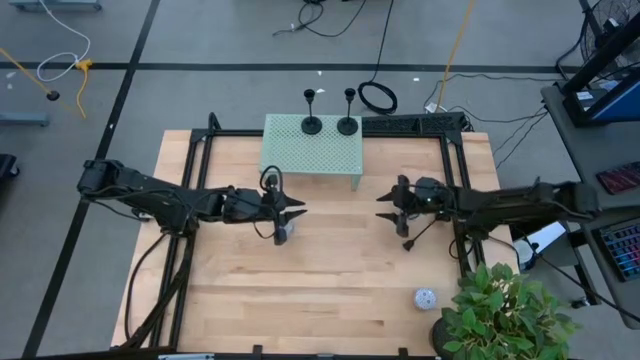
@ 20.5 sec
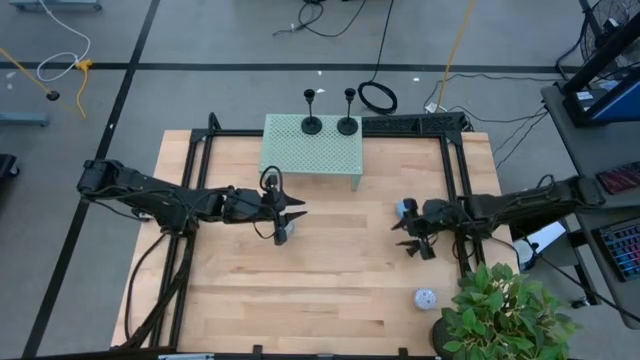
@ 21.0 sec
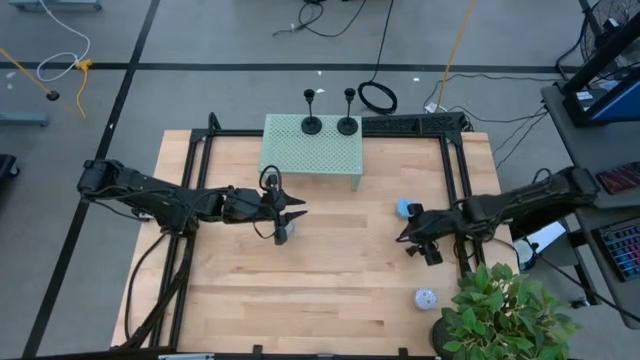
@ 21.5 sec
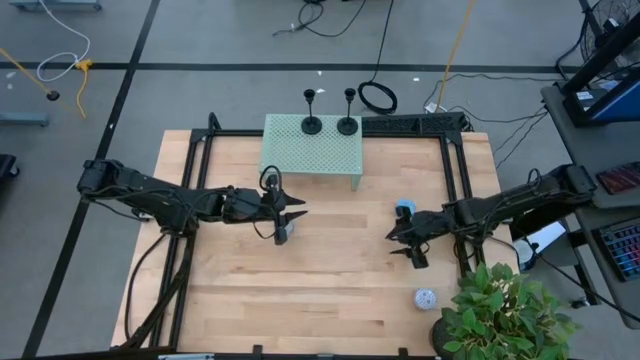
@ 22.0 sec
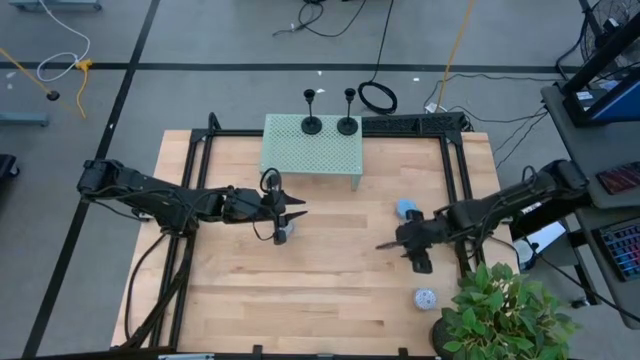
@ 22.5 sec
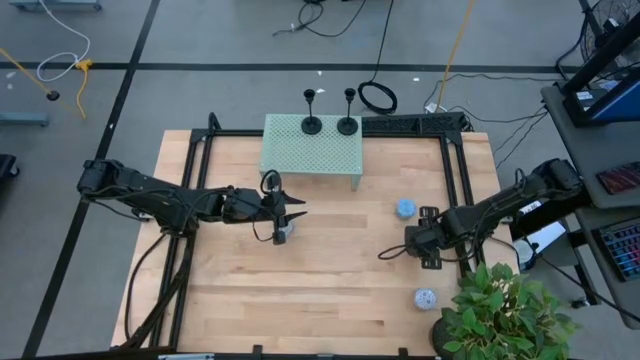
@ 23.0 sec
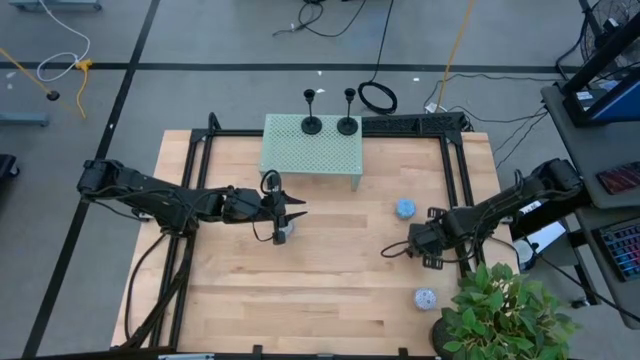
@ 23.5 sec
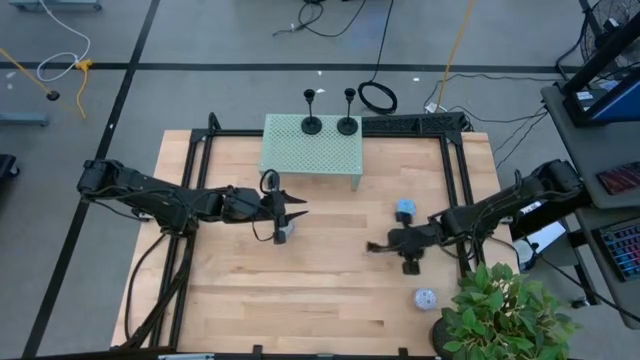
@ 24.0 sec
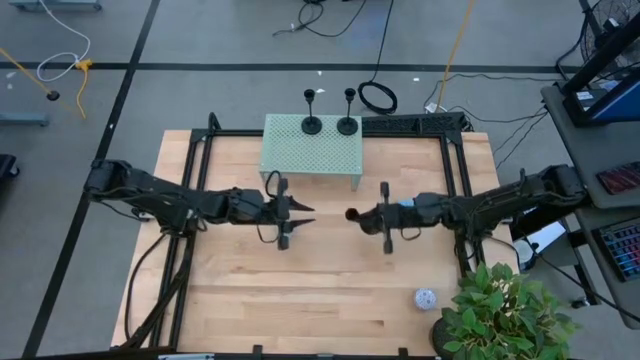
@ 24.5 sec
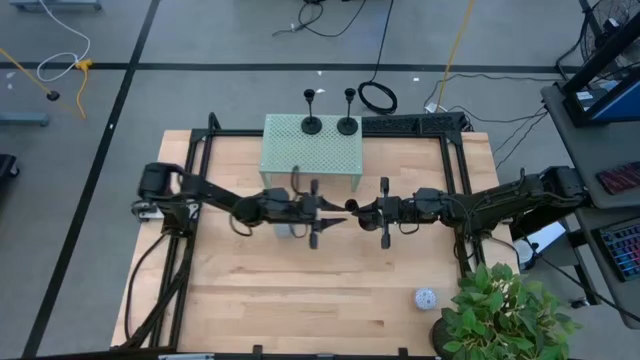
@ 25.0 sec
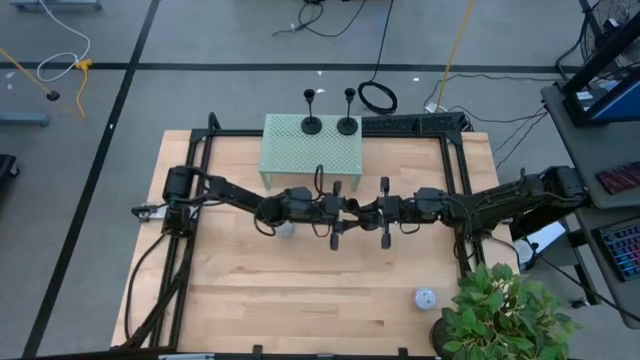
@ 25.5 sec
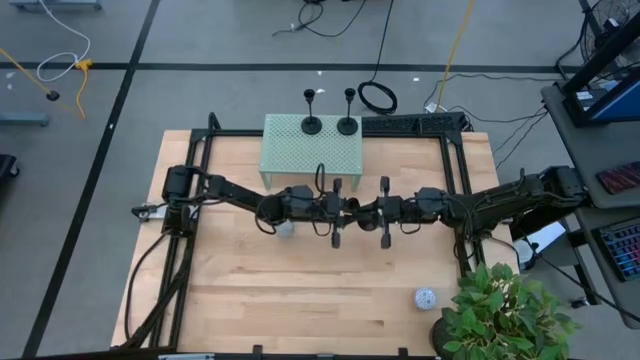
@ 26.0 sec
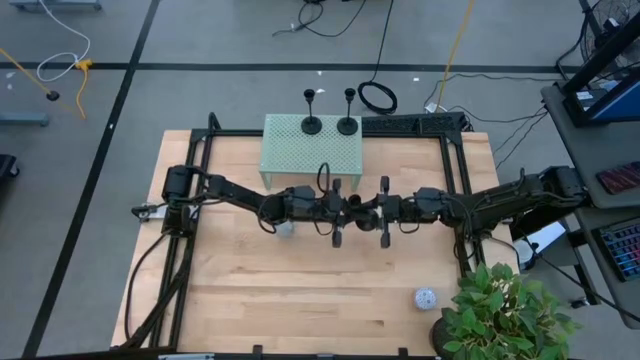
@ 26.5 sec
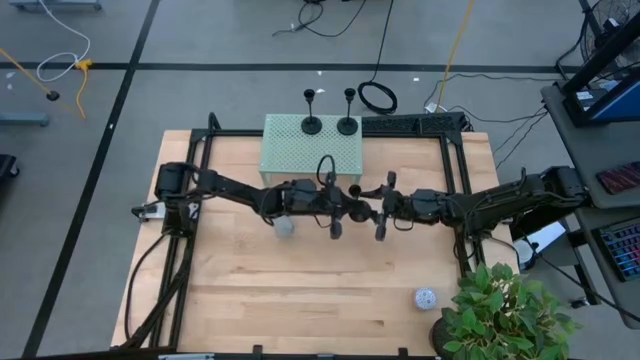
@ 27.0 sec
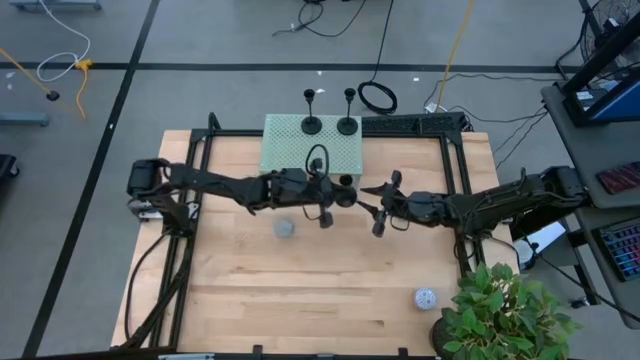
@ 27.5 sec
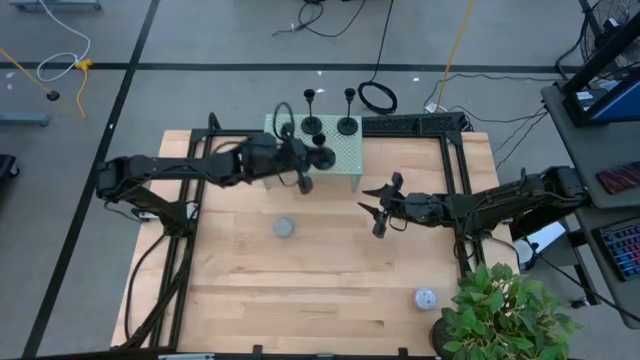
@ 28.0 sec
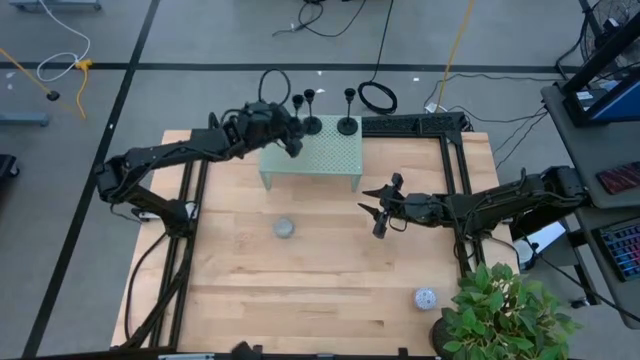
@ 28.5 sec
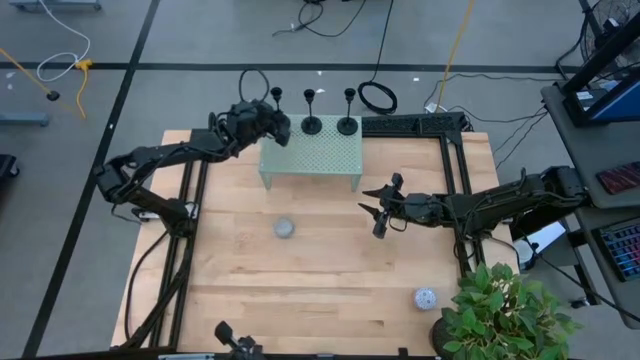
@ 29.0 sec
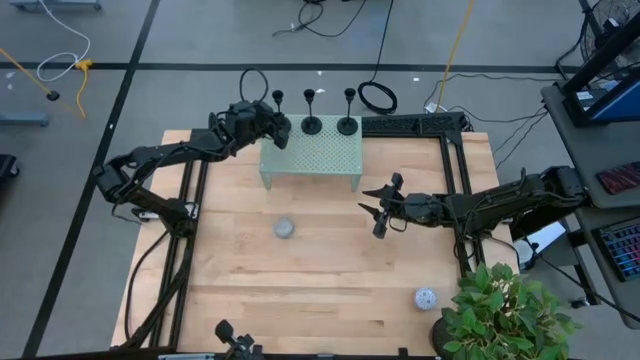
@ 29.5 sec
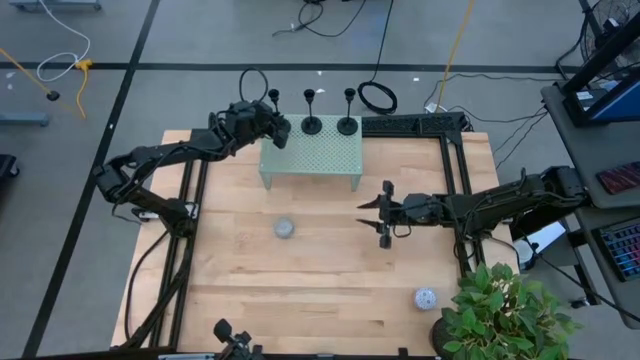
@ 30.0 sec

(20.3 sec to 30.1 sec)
Task: Pick & Place candle stick holders
Put the black candle holder on the shelf

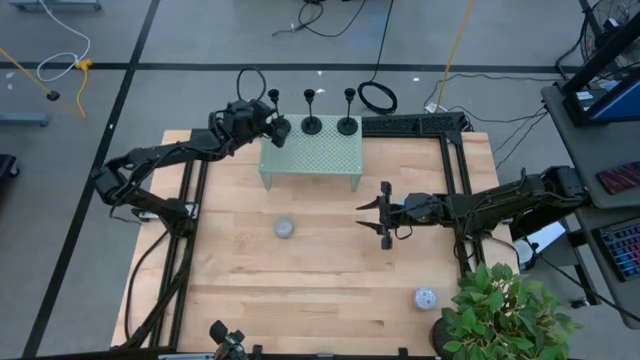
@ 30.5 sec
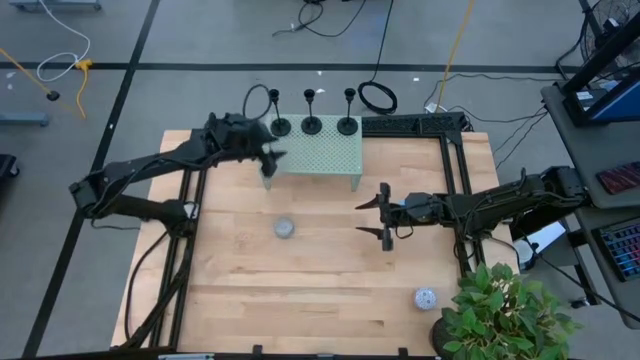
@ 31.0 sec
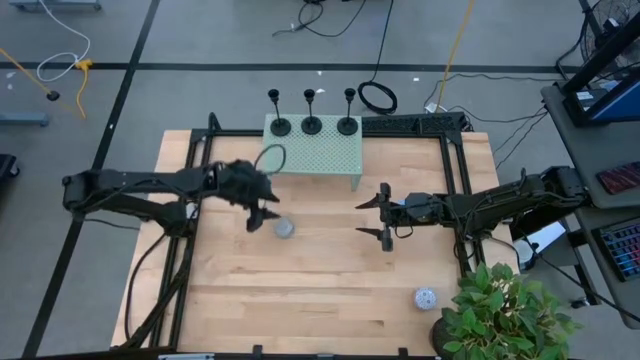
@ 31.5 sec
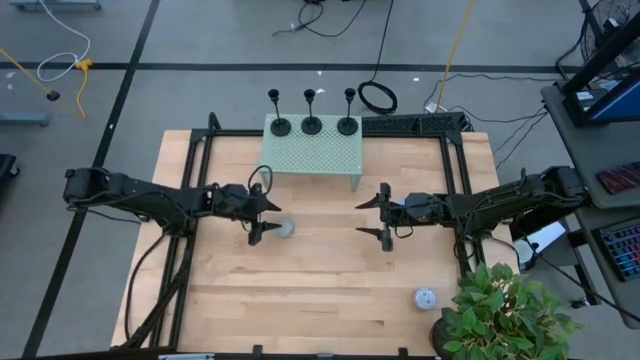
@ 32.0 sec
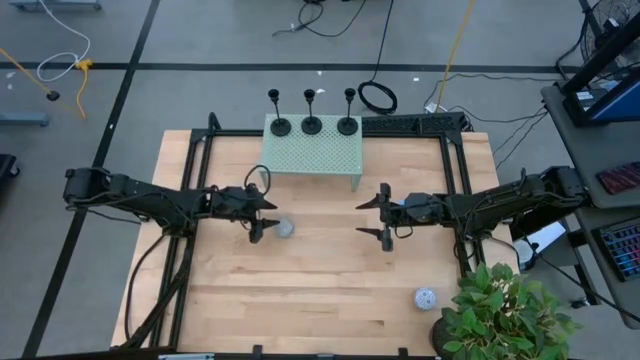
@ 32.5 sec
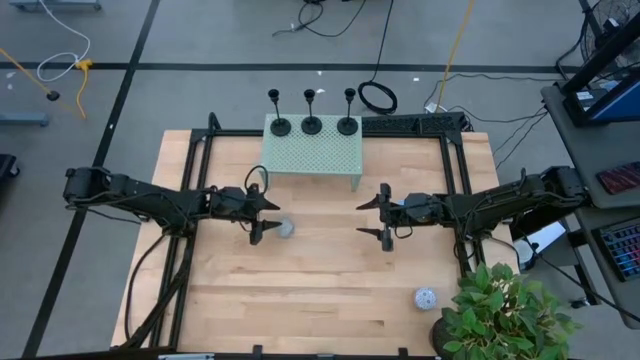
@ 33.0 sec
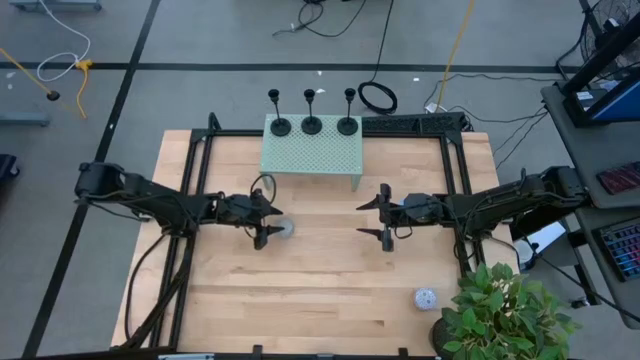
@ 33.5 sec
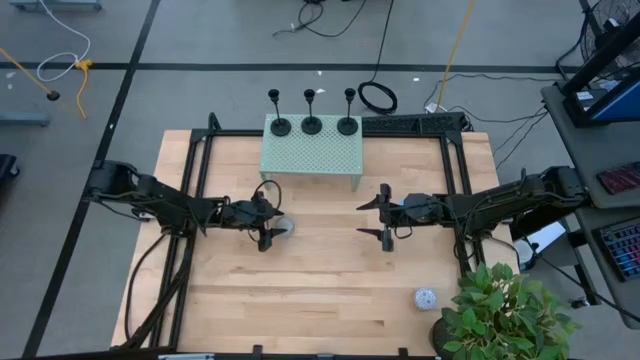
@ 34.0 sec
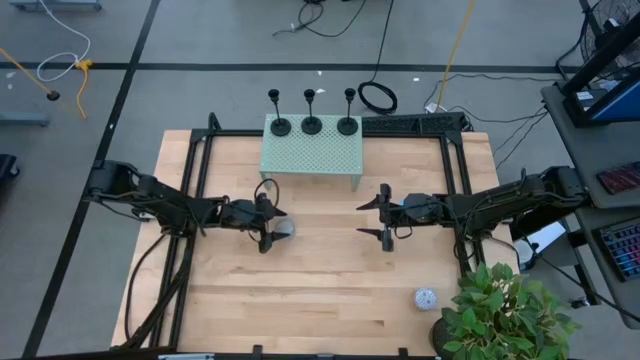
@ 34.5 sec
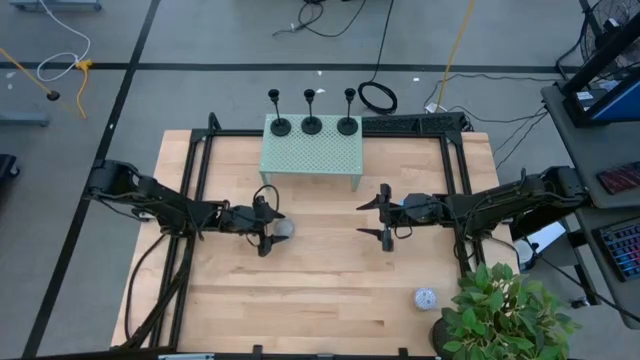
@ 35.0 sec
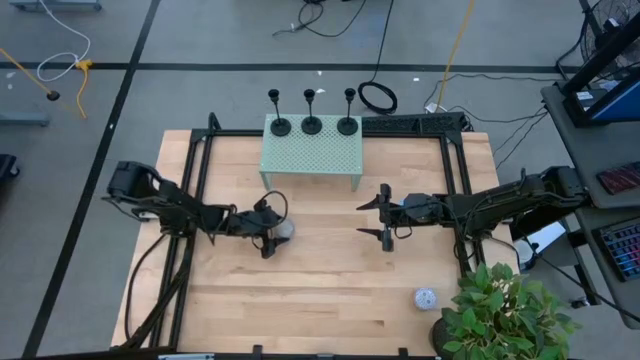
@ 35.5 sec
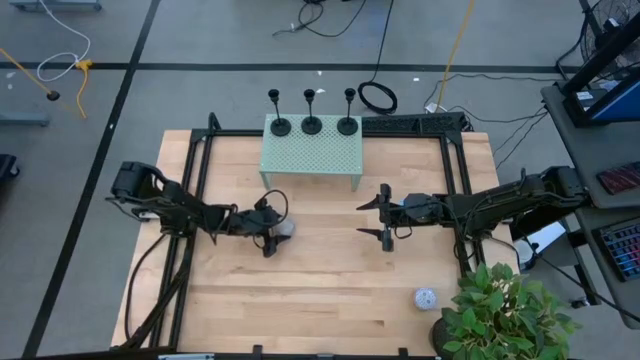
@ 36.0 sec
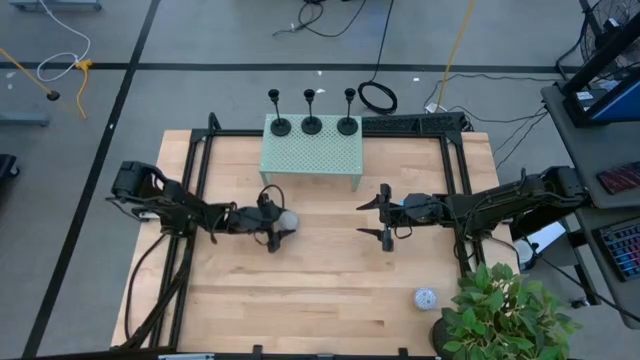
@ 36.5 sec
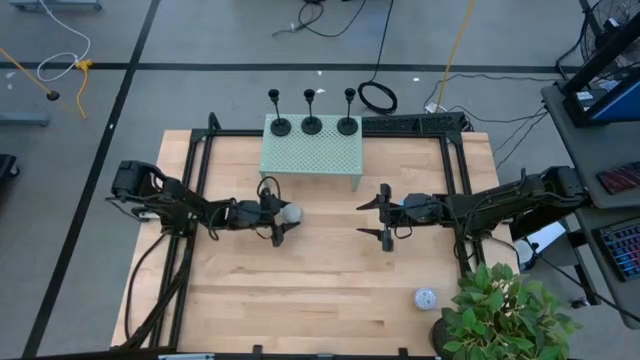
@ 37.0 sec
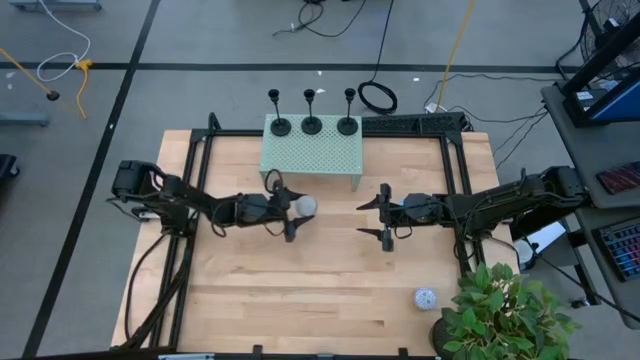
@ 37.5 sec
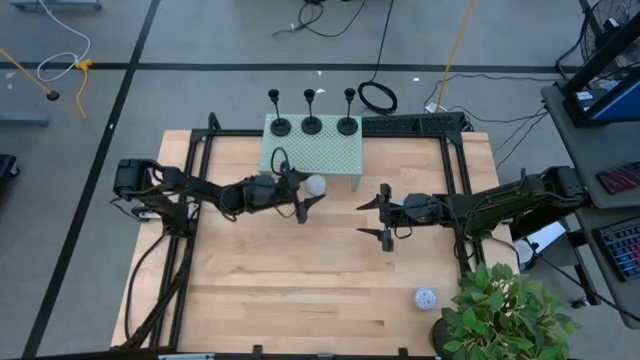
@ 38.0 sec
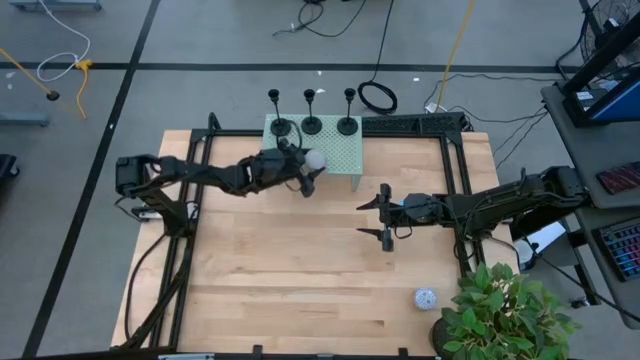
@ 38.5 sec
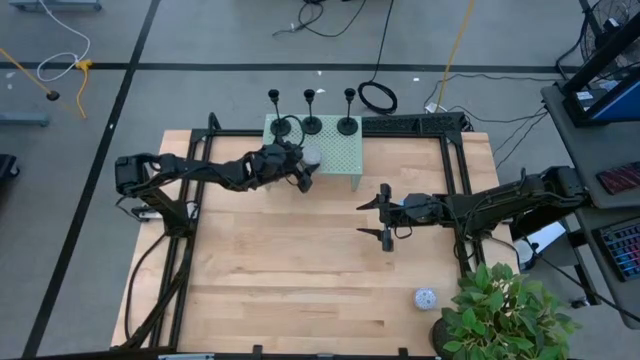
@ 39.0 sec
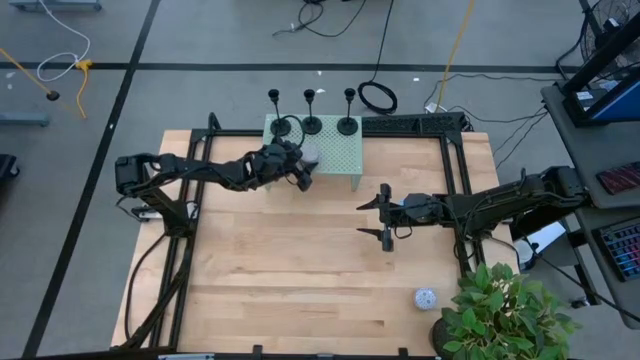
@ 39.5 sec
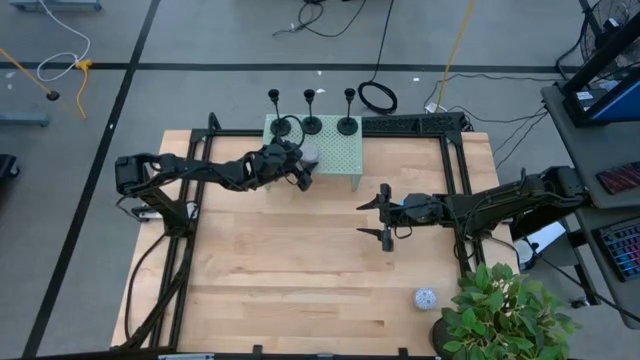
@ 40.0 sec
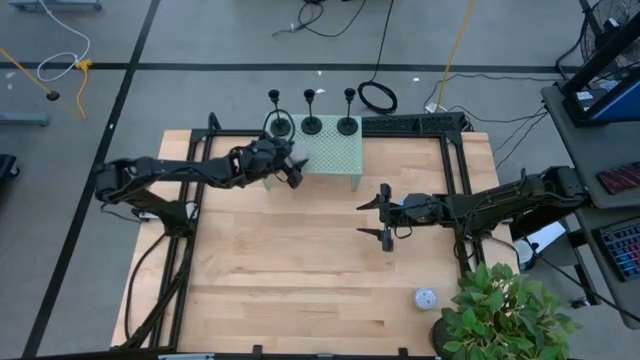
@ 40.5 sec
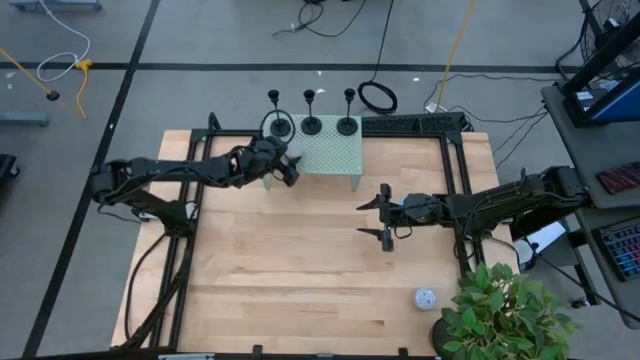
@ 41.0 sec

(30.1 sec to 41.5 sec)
Put the light blue patterned scented candle on the shelf
